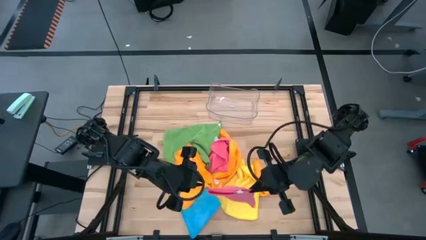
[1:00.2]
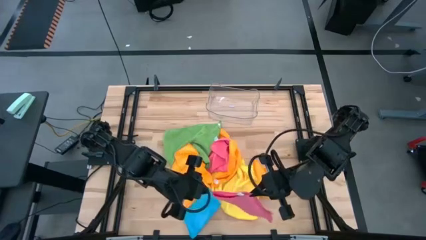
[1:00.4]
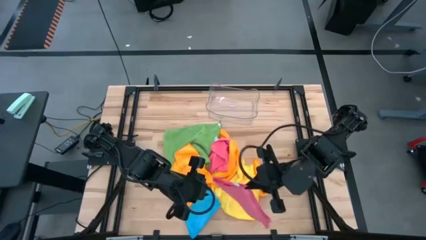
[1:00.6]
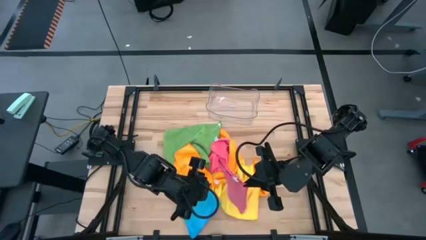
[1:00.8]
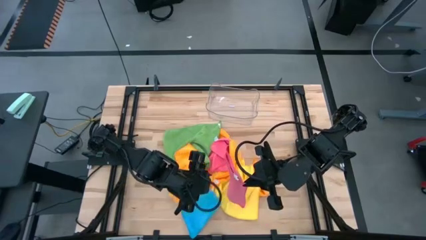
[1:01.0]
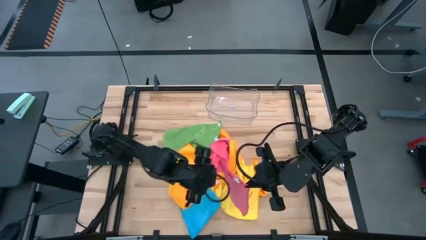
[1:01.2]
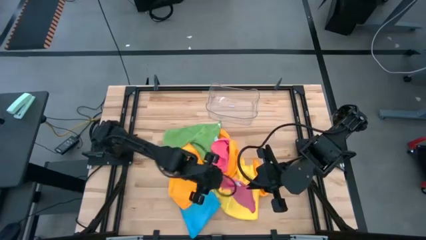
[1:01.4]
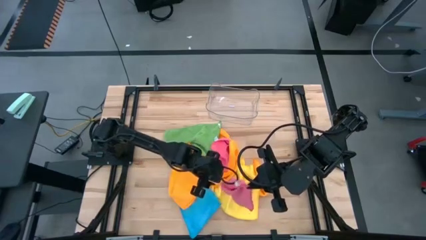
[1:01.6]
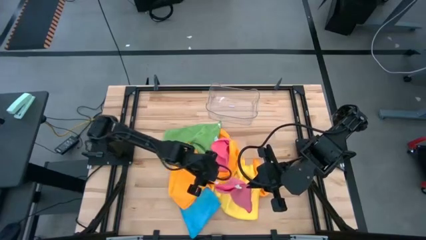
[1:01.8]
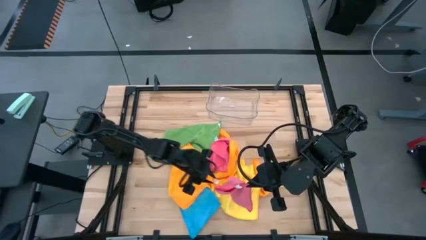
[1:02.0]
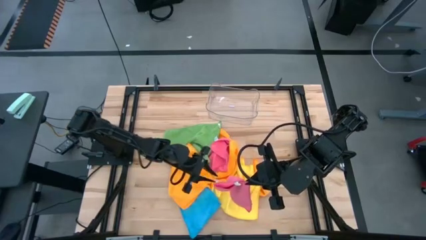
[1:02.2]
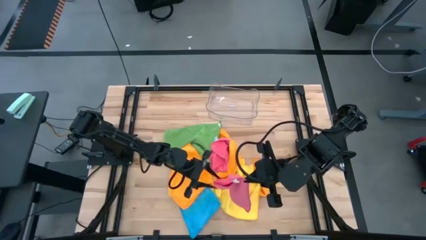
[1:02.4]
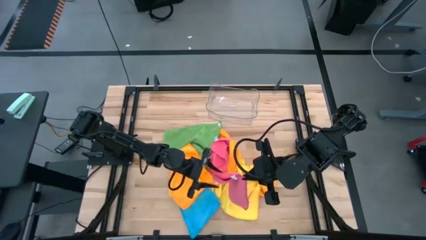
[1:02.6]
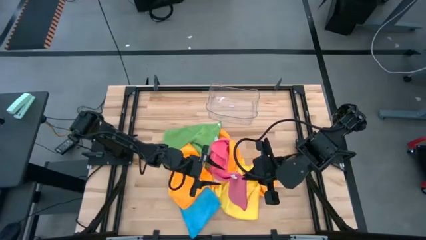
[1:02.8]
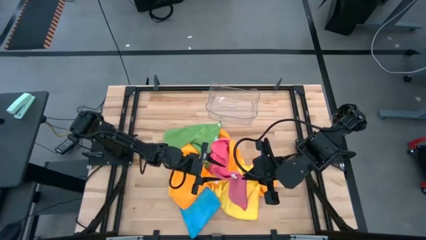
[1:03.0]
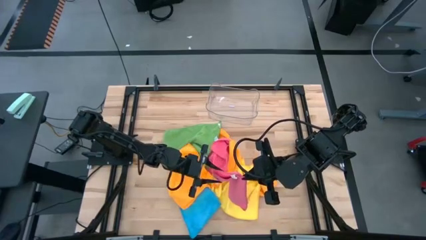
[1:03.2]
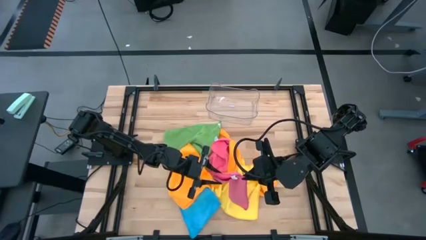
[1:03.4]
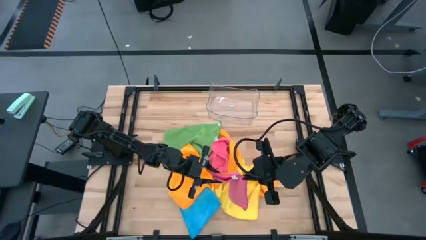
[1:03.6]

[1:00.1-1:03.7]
Task: Fold microfiber towels
Fold the pink microfiber cloth

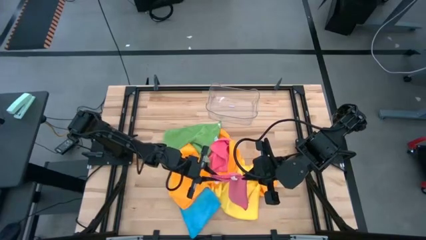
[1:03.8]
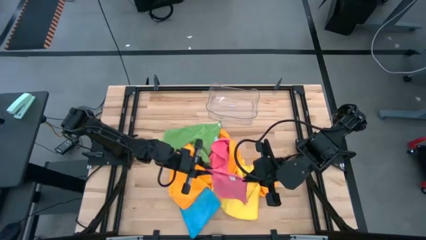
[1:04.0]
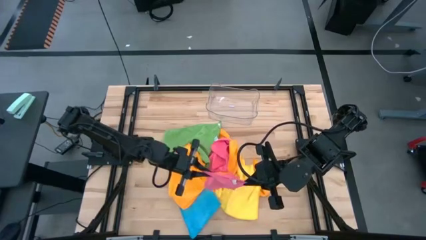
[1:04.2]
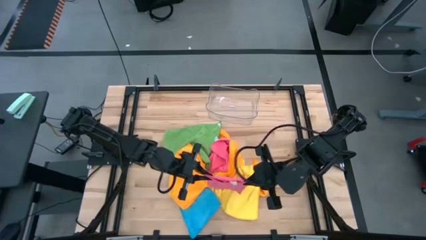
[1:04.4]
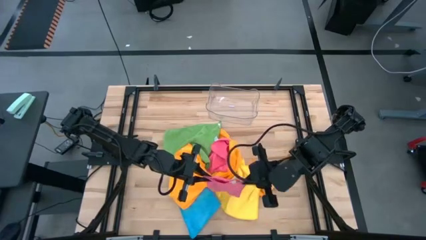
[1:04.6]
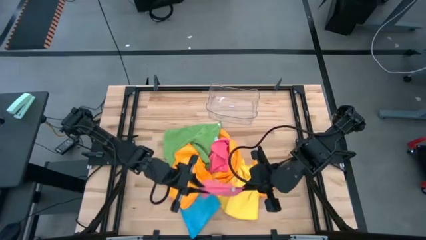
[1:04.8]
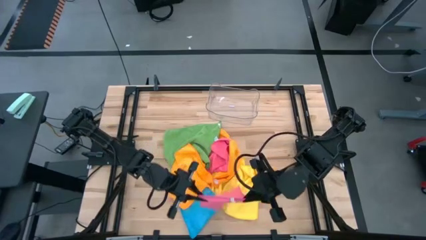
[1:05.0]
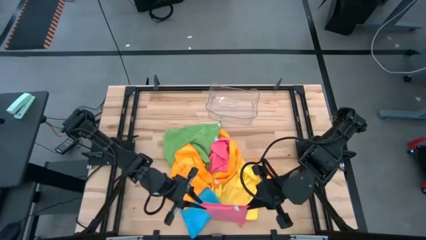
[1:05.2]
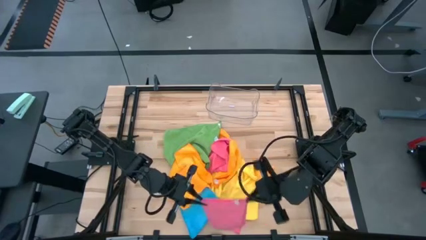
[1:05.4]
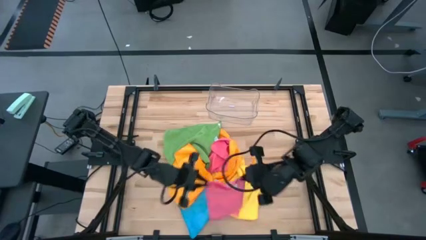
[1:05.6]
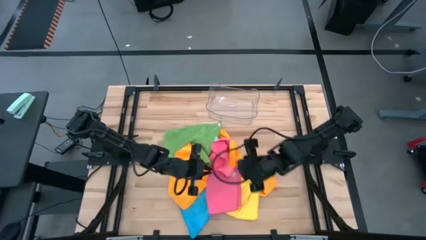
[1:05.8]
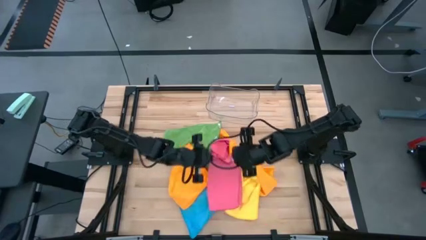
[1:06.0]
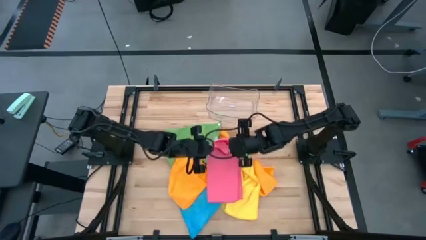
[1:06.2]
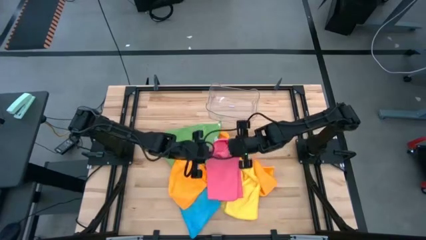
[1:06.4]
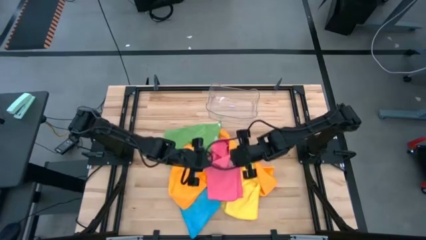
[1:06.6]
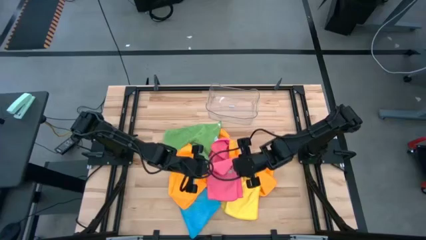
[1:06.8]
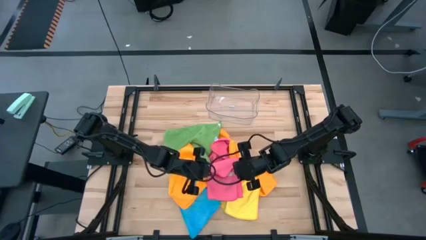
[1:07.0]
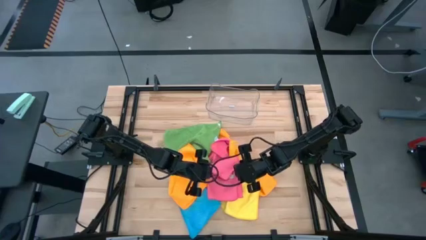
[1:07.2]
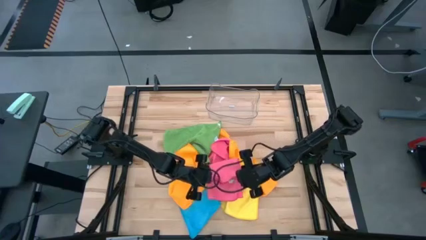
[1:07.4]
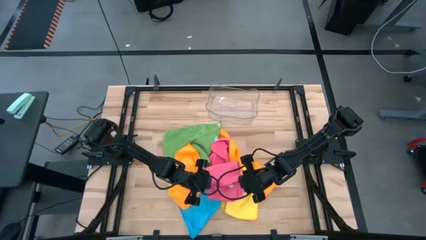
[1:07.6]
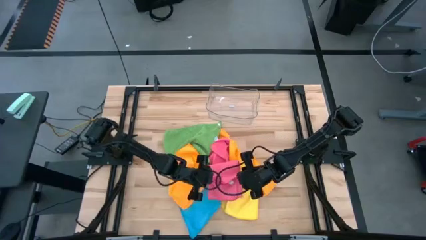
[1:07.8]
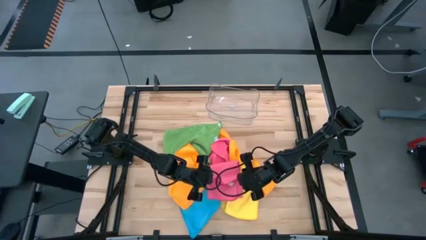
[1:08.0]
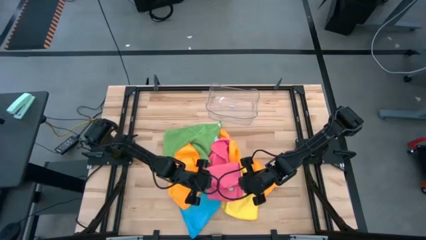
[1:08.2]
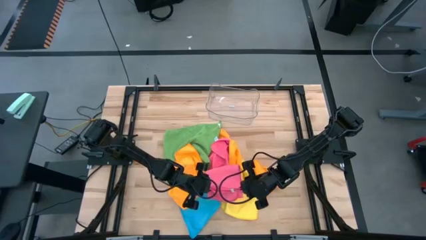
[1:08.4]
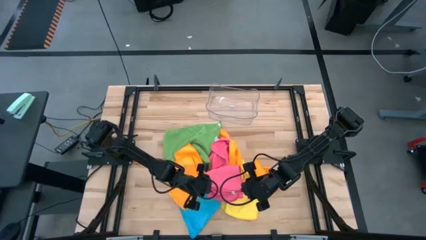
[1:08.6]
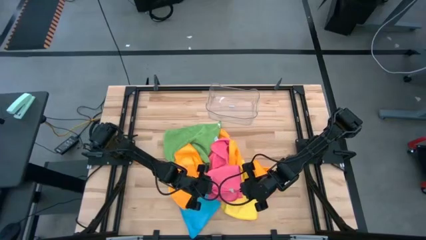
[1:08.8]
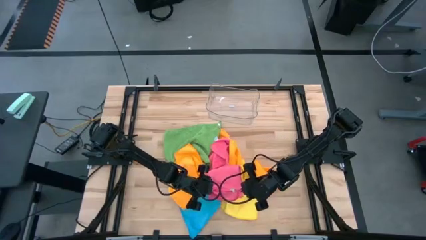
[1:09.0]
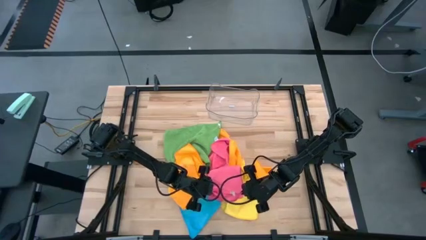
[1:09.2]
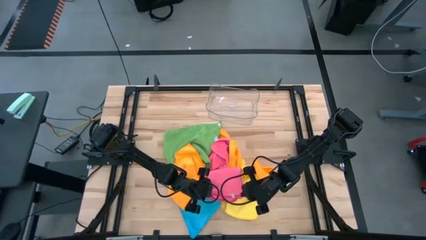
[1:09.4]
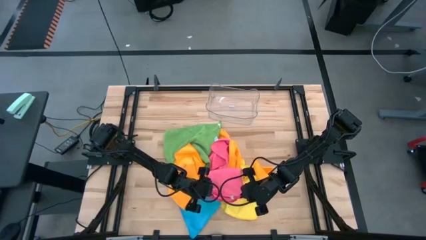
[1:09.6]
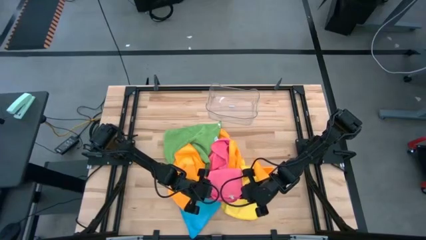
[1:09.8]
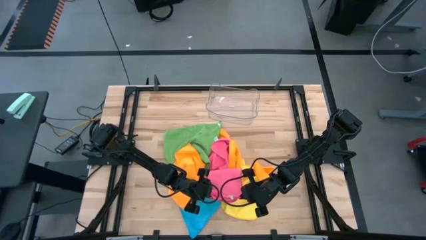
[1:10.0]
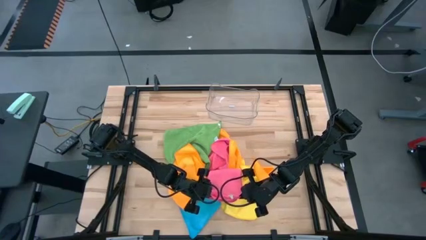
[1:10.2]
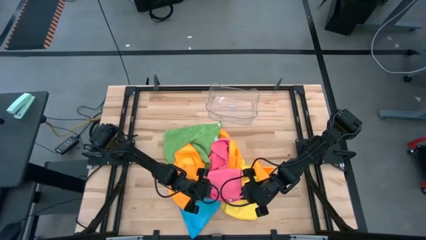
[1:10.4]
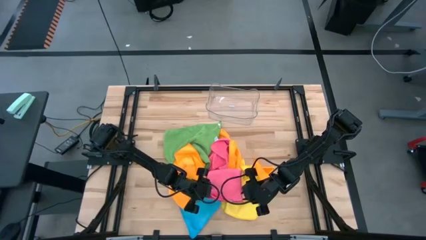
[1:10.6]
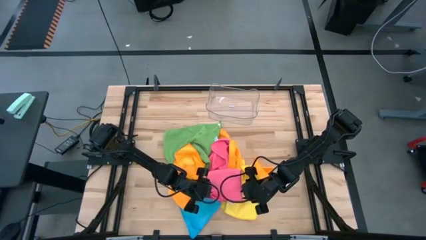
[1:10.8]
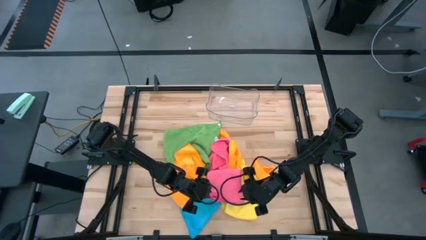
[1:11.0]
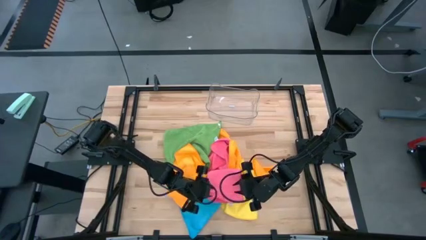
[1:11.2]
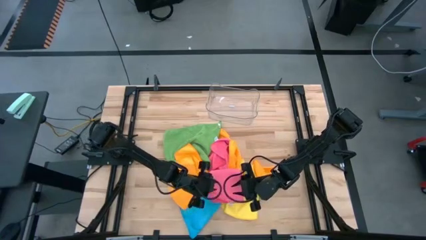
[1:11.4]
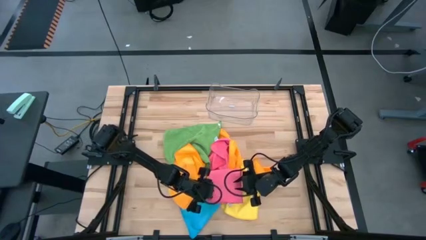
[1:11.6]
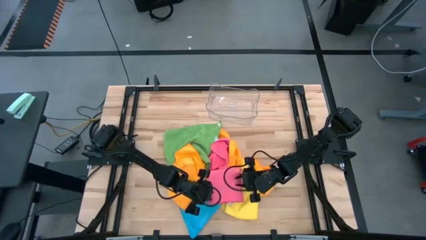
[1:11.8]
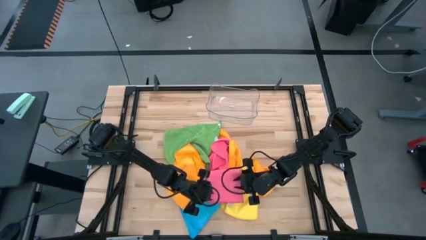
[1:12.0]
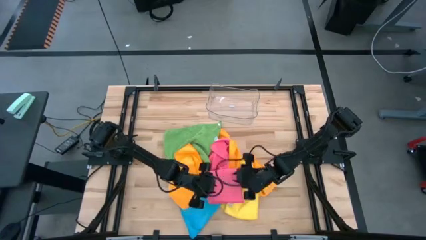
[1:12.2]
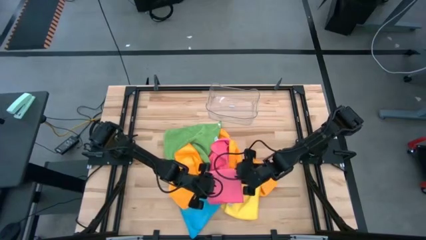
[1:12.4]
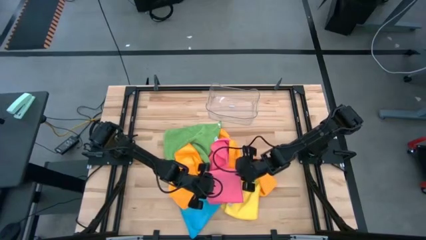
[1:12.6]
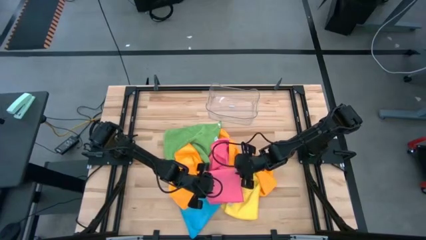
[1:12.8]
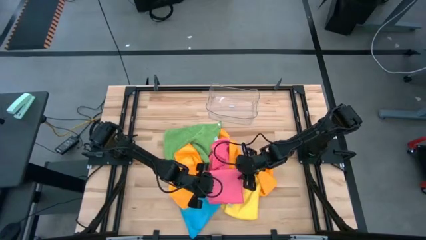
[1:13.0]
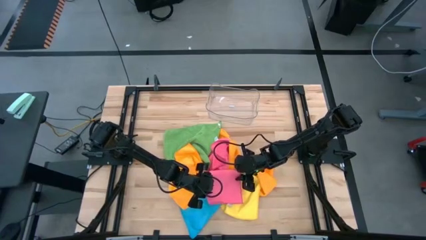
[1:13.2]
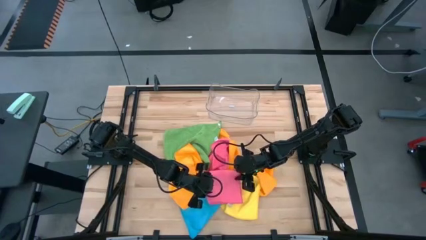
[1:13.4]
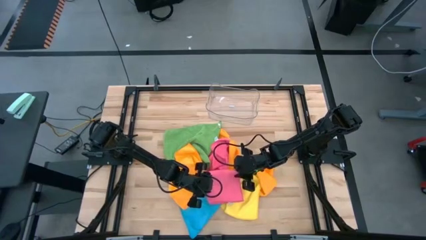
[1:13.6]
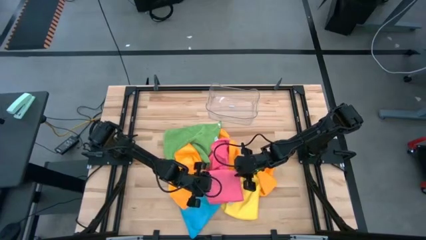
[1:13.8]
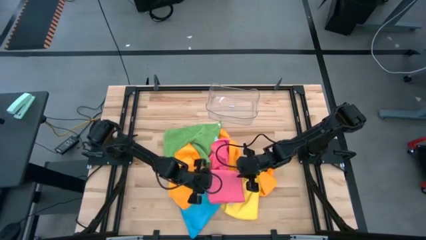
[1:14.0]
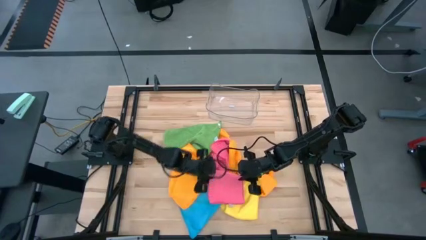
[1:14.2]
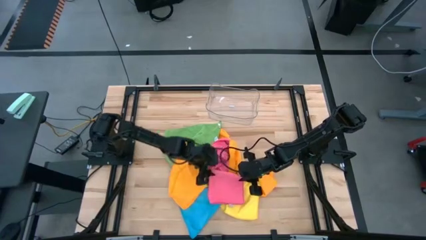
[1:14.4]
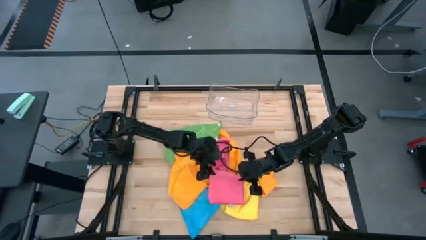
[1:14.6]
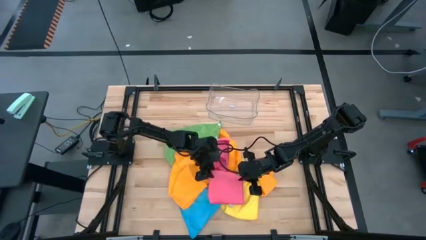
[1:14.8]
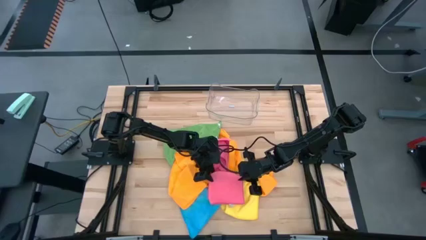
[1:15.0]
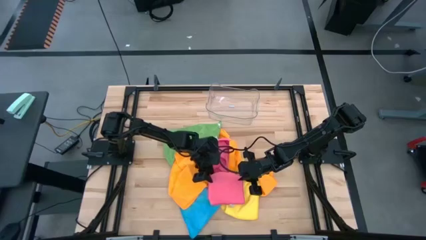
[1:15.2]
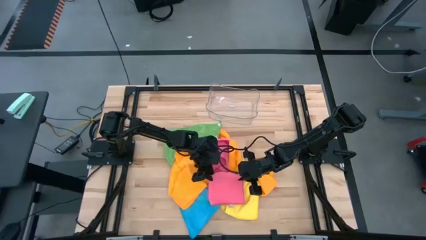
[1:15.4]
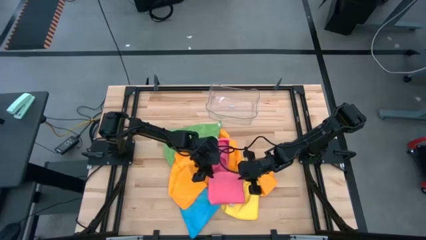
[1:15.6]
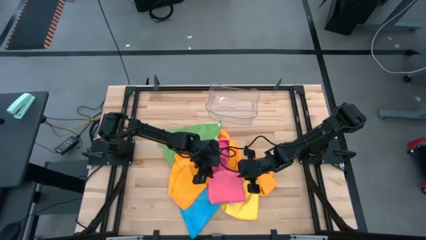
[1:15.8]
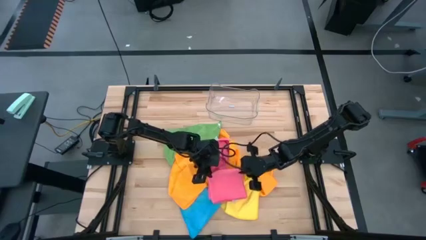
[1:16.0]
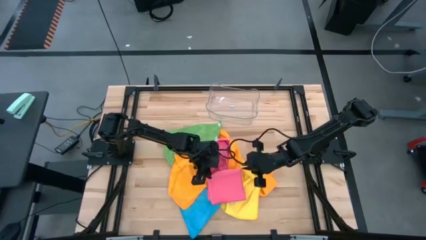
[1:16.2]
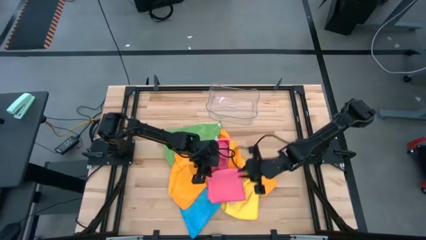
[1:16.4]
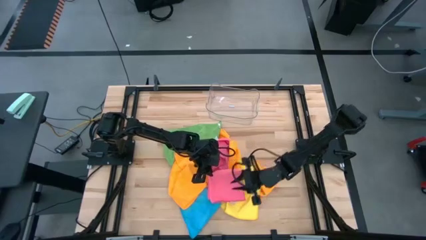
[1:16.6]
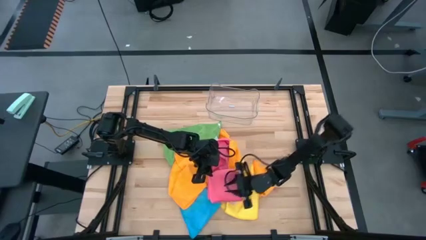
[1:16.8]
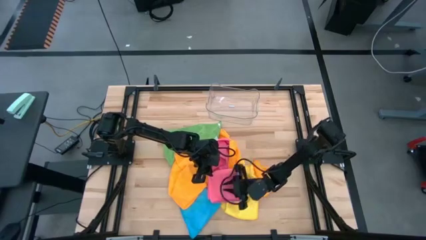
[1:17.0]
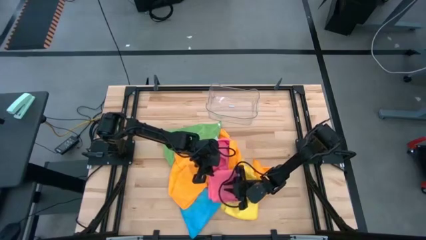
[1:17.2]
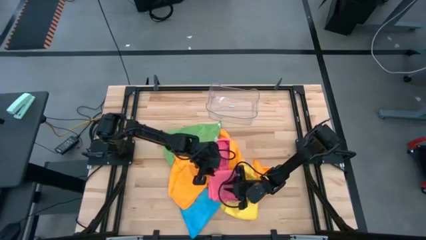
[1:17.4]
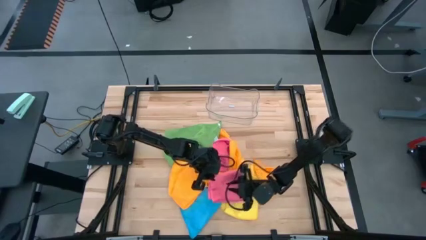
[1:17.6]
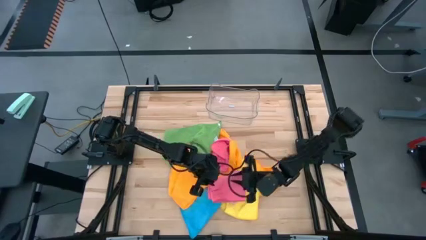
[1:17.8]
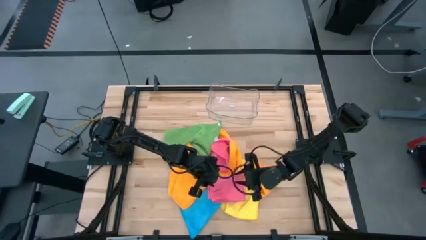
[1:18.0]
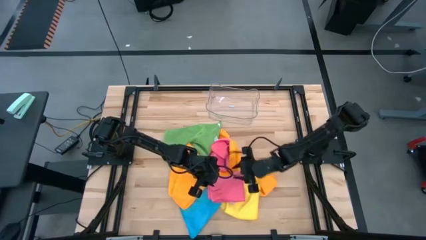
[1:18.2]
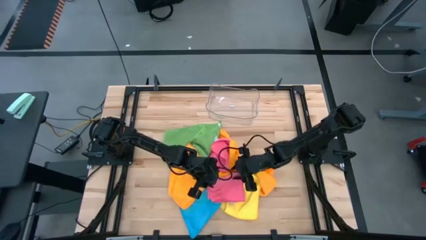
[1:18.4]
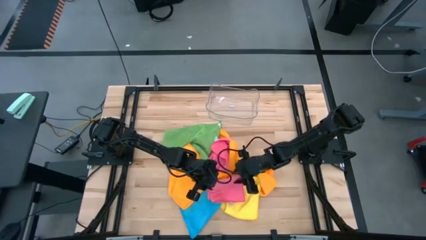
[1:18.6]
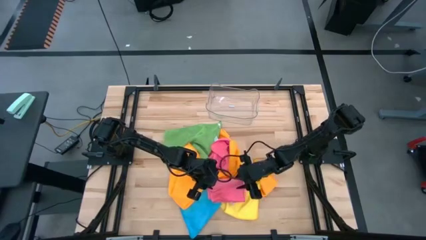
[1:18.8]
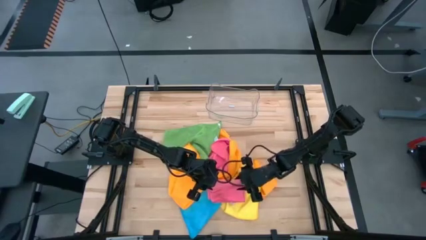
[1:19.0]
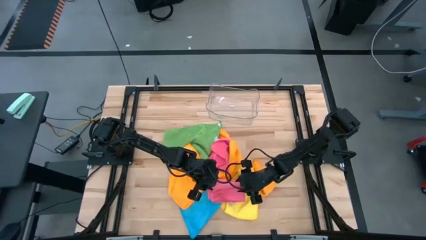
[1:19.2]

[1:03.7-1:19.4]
Fold the pink microfiber cloth
